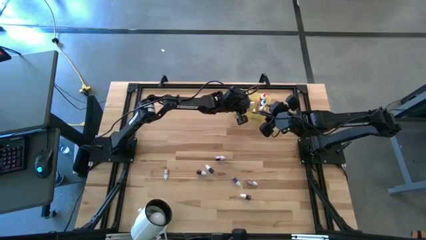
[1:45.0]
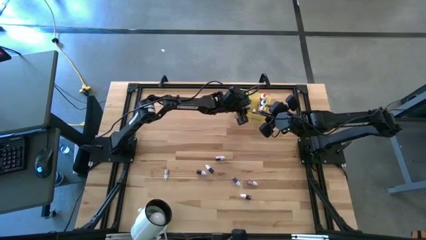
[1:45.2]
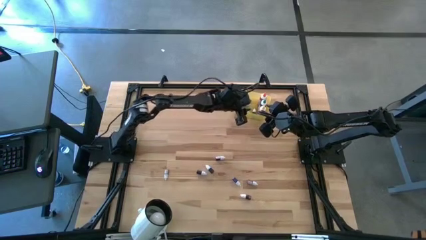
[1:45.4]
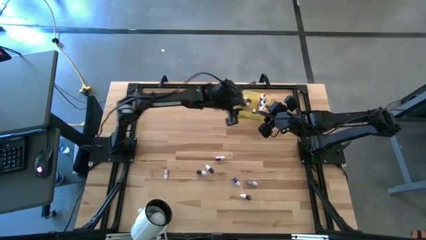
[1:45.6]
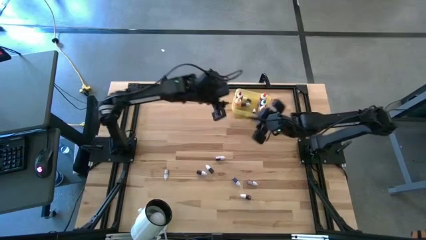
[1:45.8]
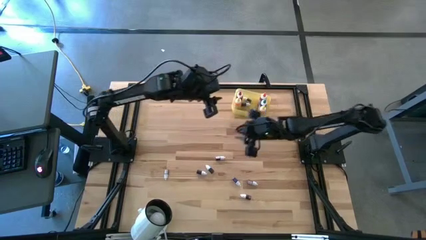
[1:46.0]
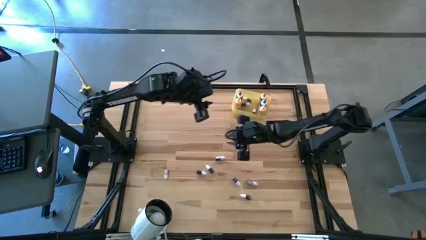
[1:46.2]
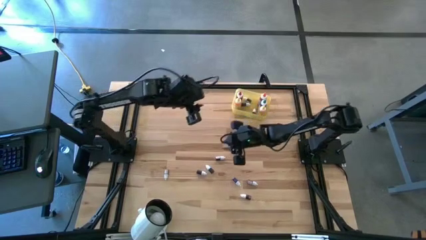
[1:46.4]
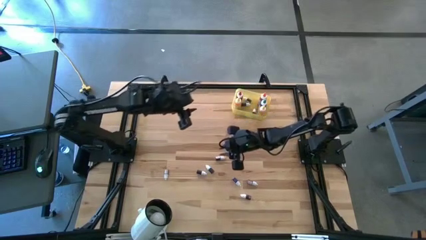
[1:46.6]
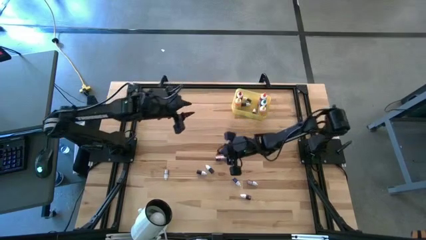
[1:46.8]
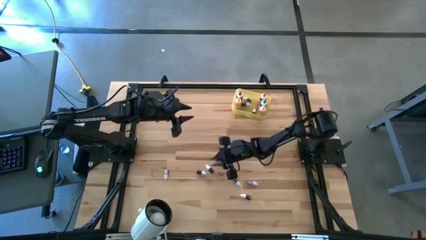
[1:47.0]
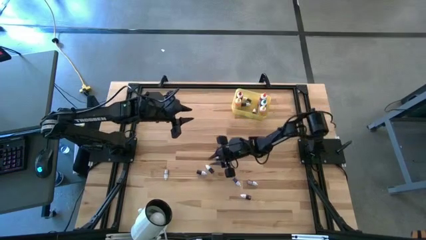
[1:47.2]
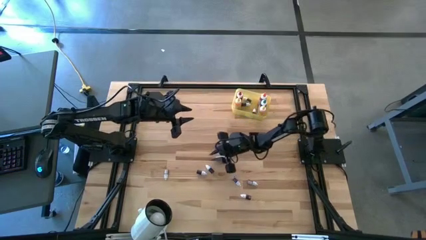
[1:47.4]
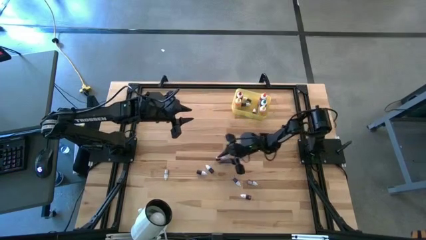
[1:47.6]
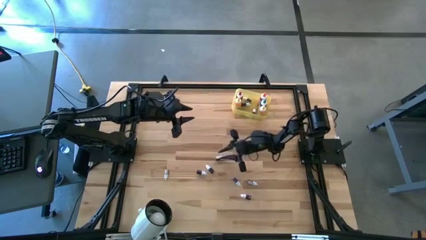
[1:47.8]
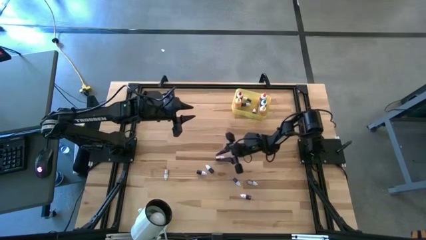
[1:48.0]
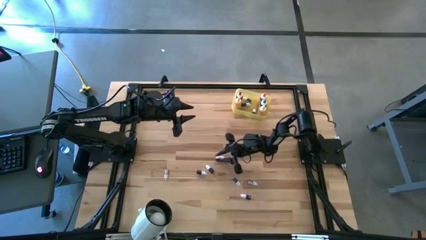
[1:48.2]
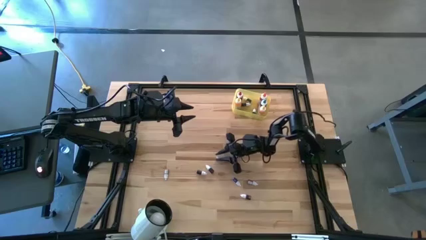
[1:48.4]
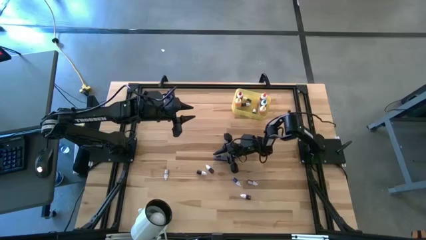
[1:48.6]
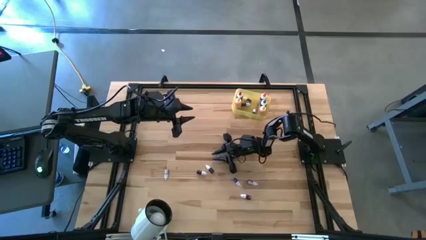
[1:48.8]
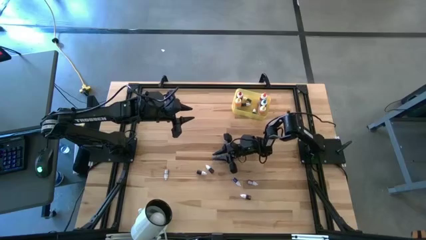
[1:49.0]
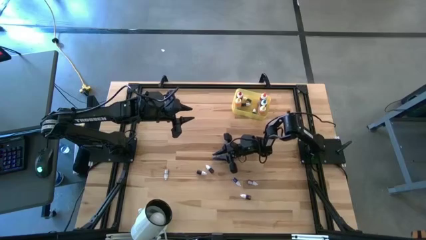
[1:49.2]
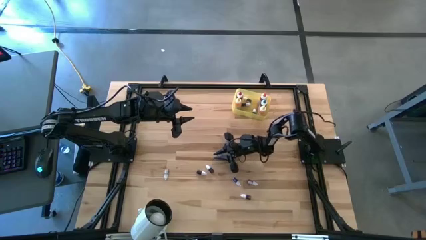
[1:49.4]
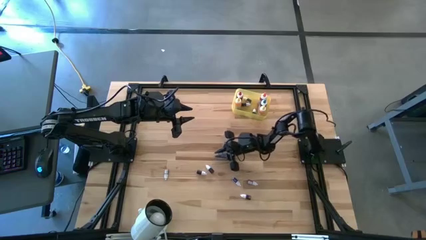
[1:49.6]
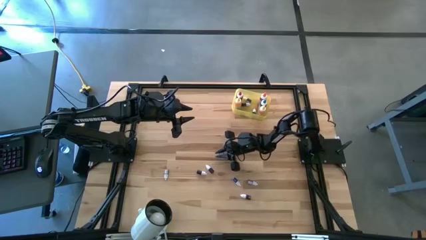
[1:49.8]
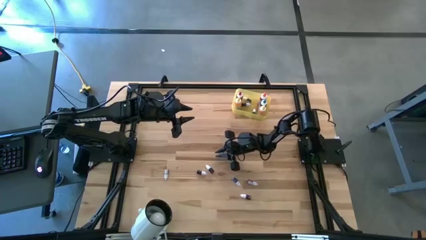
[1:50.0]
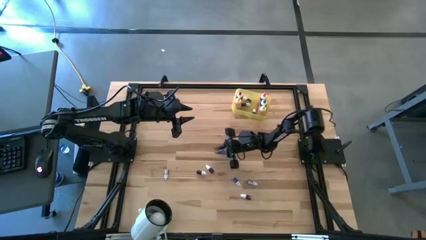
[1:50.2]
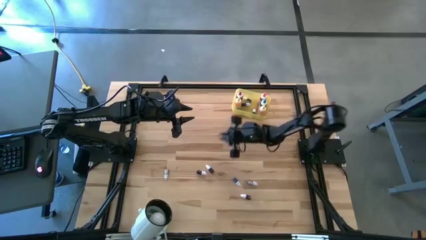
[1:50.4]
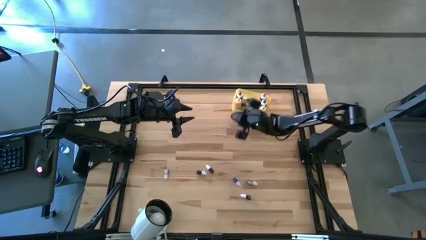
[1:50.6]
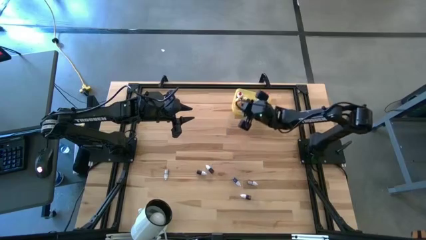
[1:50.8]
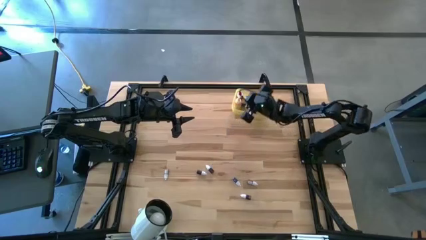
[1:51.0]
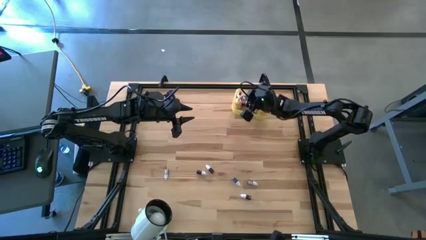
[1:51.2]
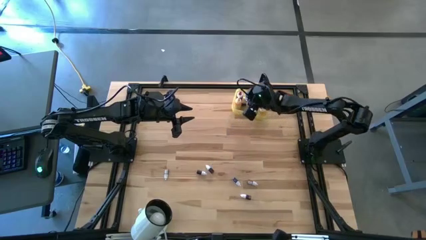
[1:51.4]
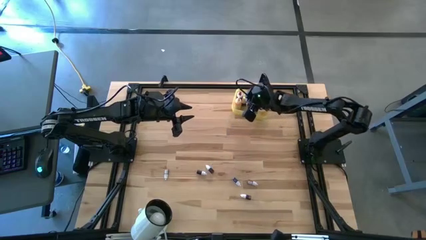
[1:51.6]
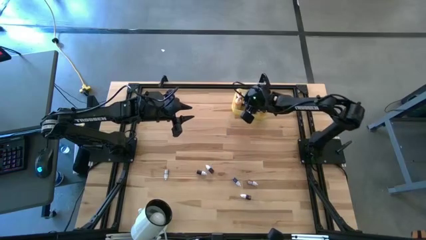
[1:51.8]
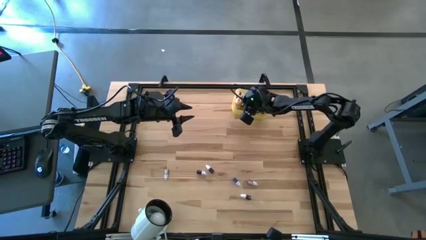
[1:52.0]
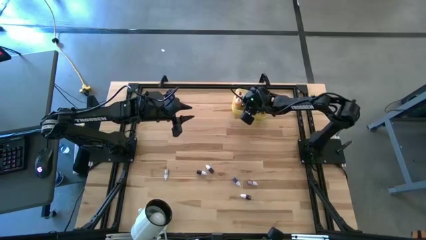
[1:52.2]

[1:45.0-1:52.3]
Task: Pick & Place food coloring
Put the small red food coloring bottle into the yellow bin

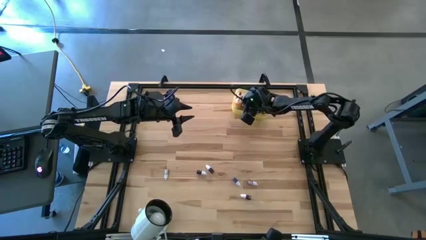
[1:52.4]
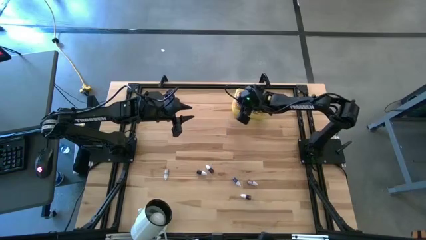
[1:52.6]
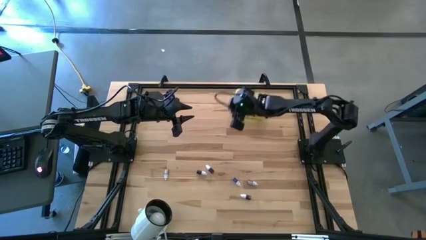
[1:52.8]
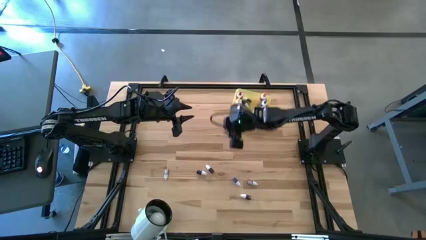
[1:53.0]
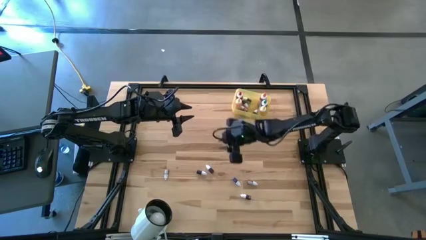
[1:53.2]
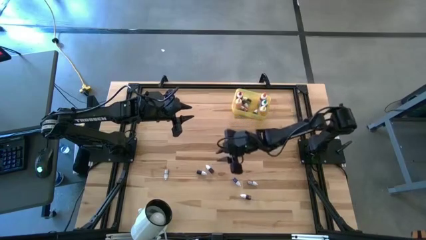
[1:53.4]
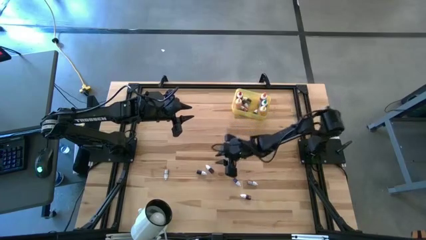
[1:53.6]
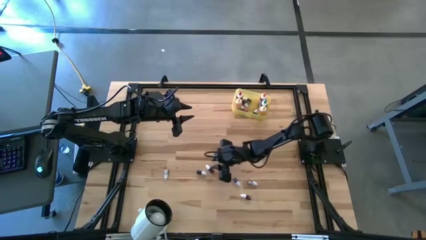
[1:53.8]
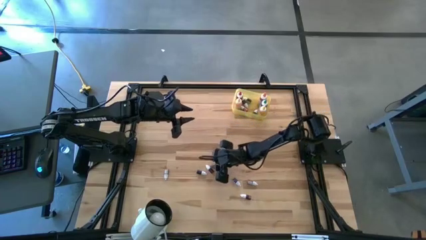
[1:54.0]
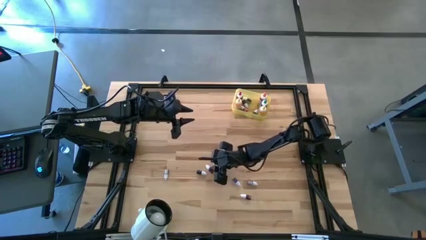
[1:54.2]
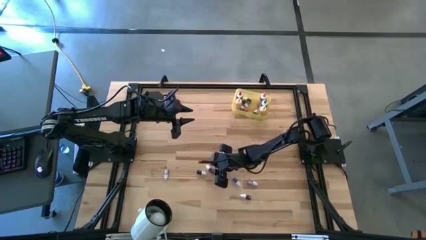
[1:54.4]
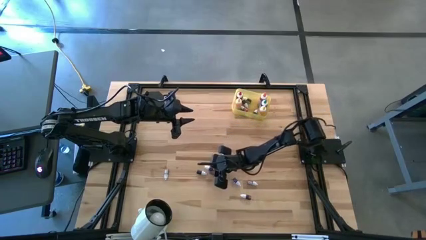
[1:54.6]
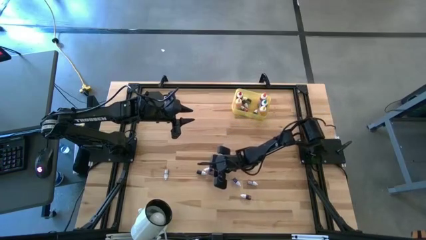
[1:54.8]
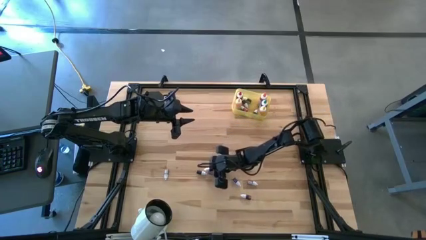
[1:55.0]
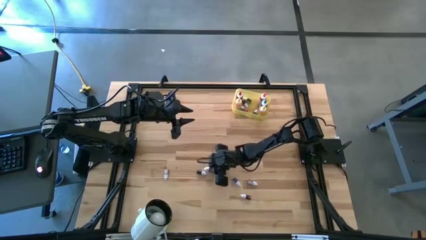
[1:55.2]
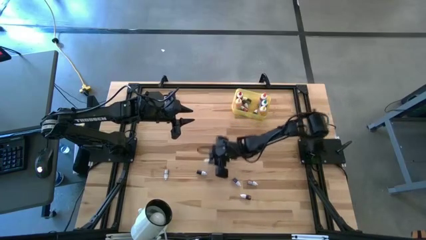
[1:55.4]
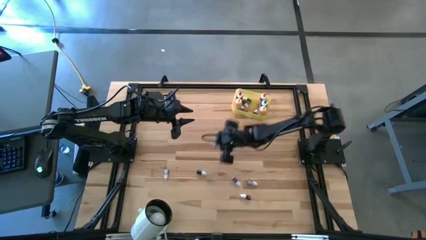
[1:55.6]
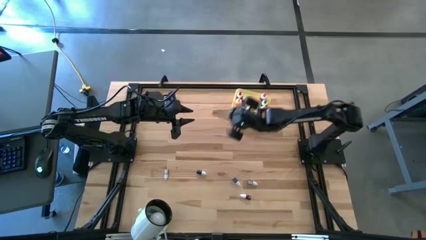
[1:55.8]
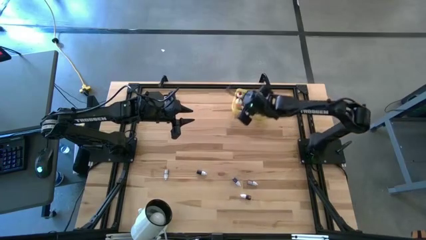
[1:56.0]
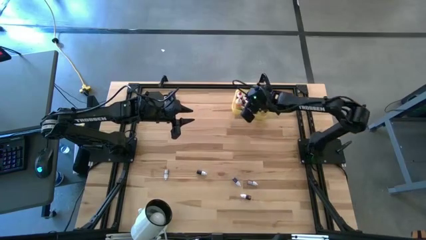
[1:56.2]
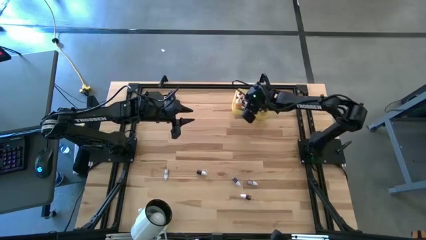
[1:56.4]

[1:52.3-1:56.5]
Put the small red food coloring bottle into the yellow bin

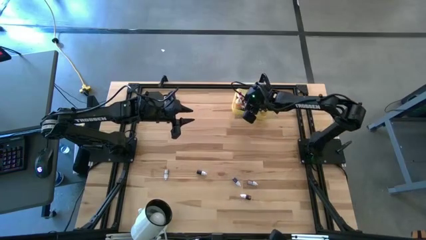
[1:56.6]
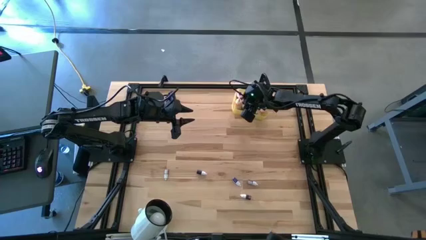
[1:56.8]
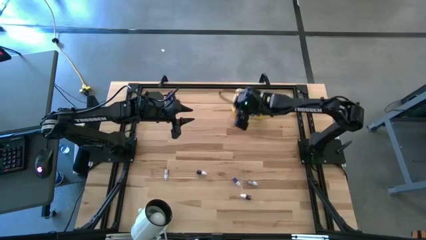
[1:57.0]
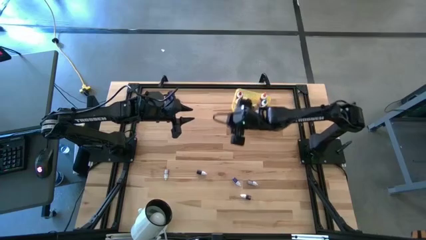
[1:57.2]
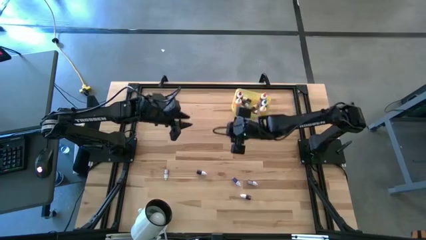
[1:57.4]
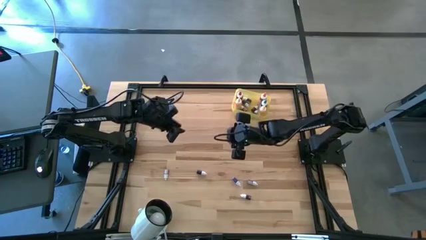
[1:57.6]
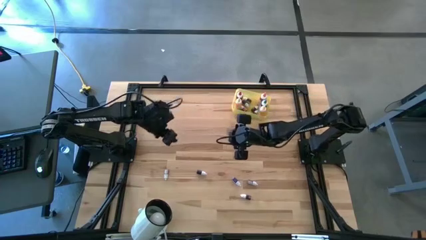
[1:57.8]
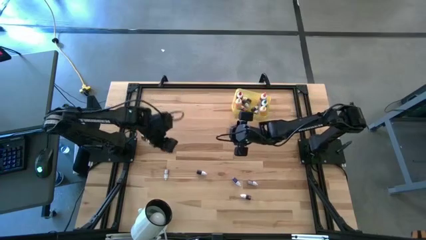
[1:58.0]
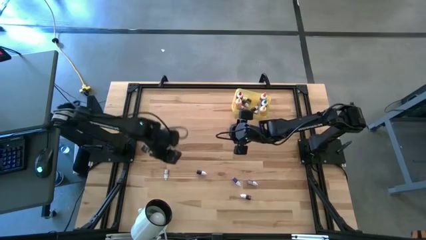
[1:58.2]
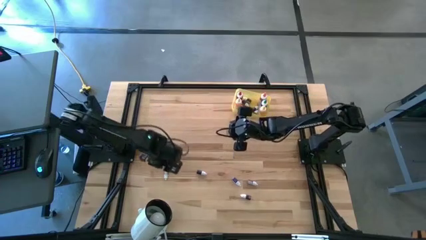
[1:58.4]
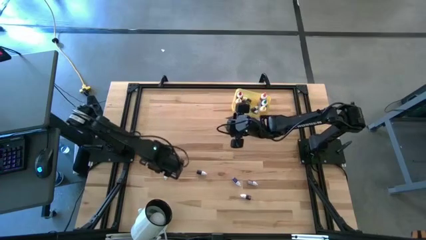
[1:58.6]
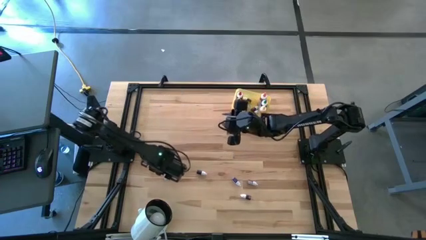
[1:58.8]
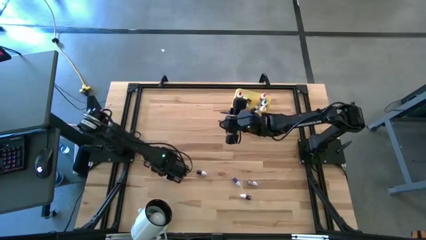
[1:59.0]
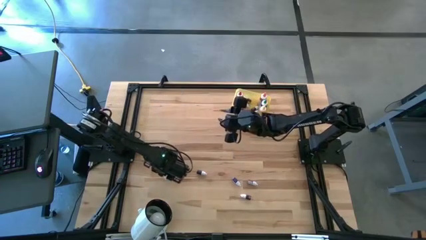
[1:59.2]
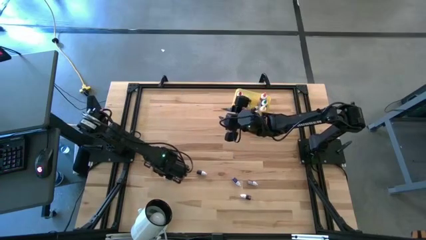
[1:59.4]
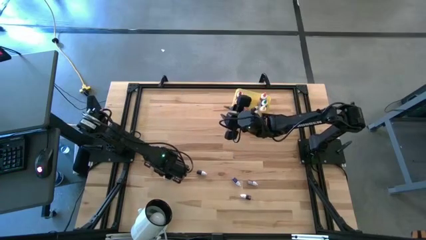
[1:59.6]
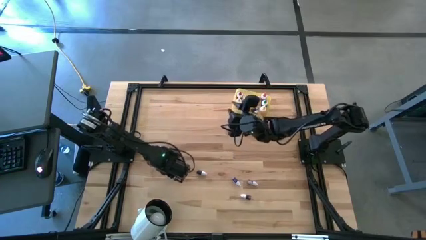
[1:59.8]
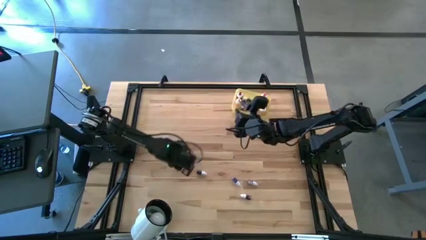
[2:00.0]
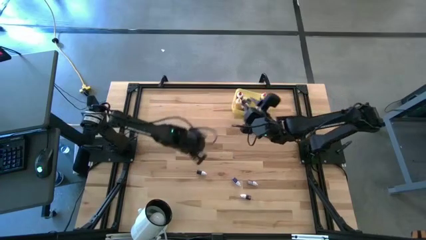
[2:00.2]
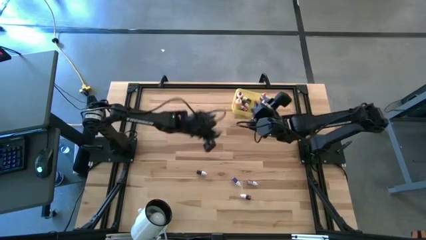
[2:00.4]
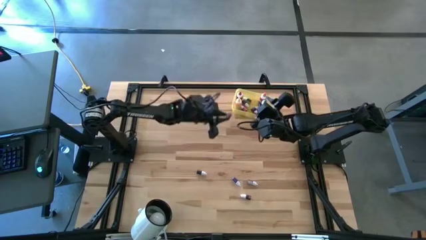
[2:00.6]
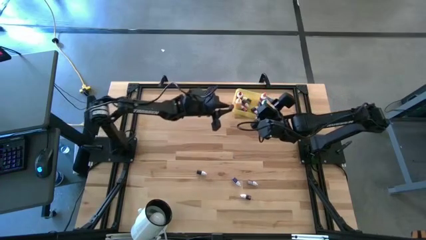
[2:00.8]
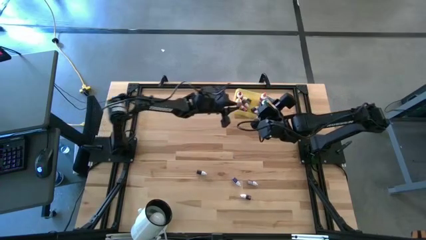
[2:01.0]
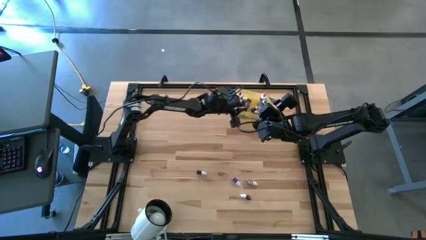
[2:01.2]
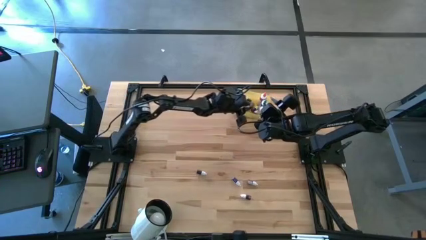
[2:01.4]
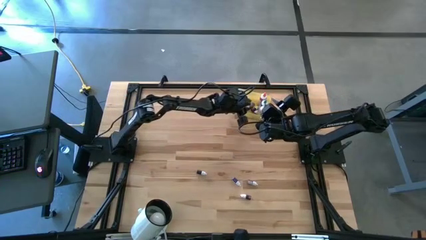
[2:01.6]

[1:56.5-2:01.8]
Put the small violet food coloring bottle into the yellow bin
